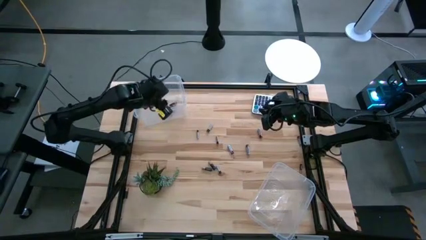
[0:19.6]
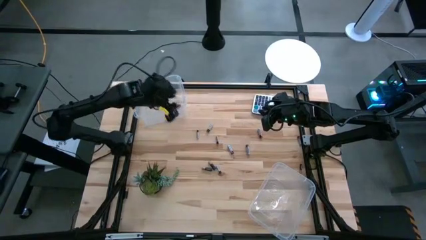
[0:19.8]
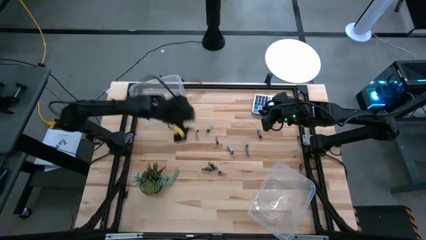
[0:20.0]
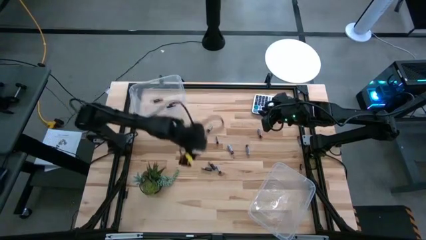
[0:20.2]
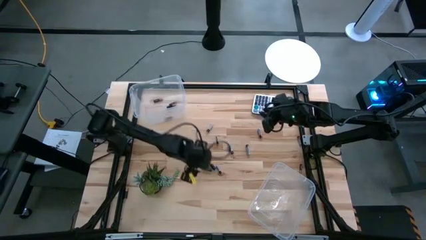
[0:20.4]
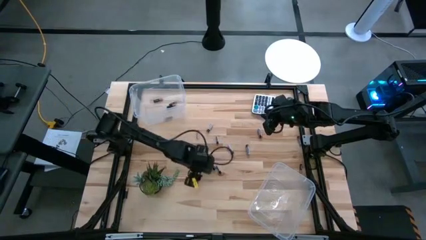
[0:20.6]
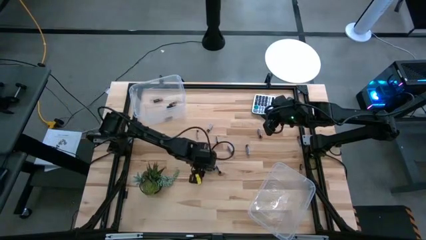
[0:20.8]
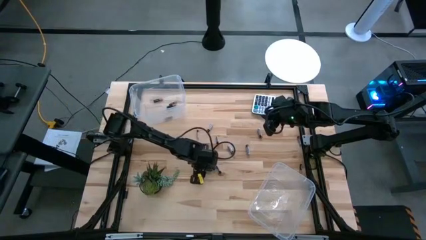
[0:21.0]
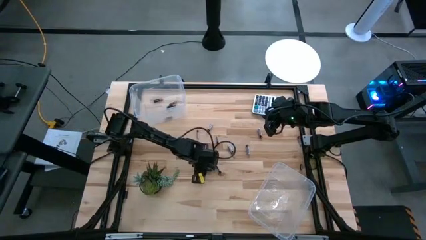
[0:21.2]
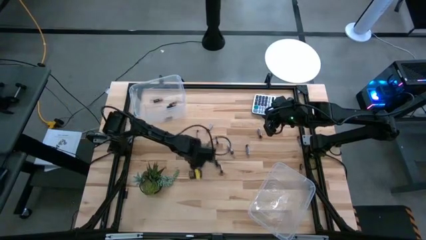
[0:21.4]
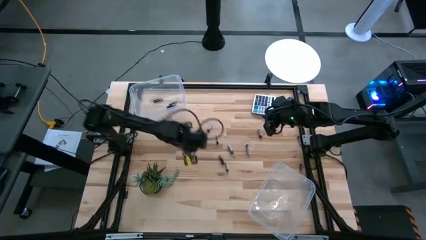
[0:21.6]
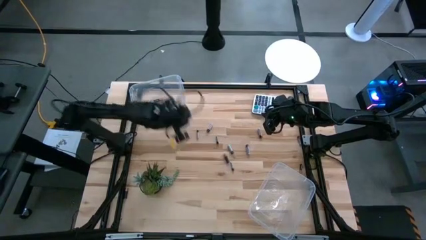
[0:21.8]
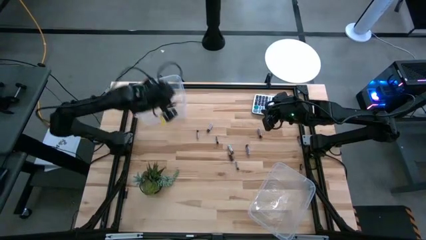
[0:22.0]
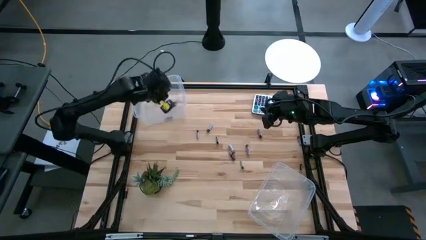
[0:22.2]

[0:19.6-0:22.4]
Task: Sort batteries
Put the black battery into the top transparent bin

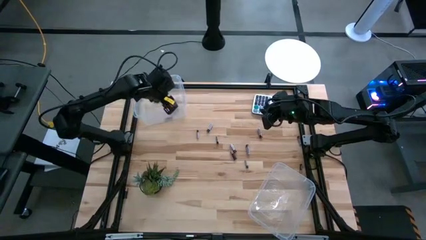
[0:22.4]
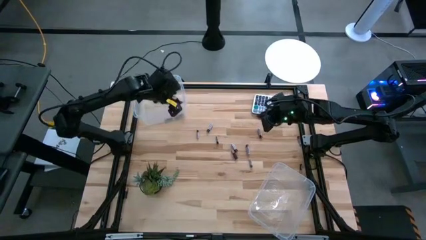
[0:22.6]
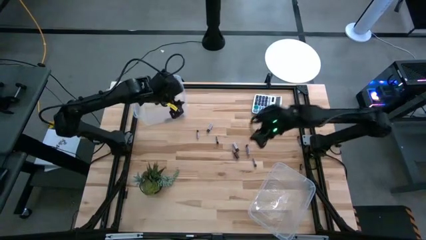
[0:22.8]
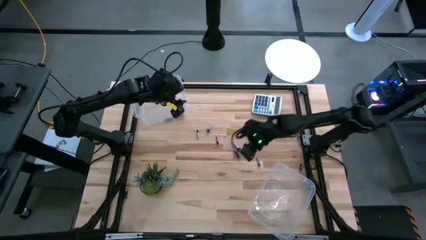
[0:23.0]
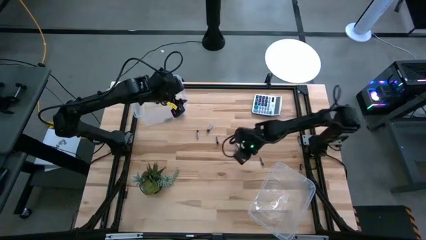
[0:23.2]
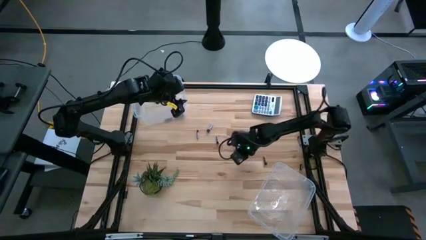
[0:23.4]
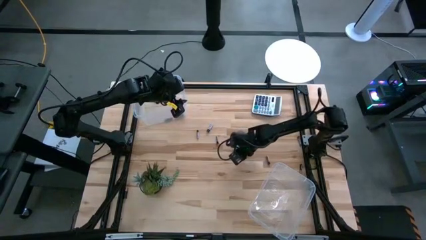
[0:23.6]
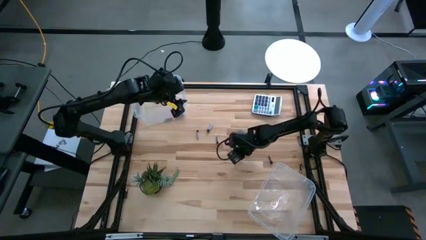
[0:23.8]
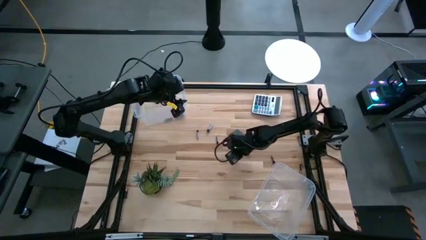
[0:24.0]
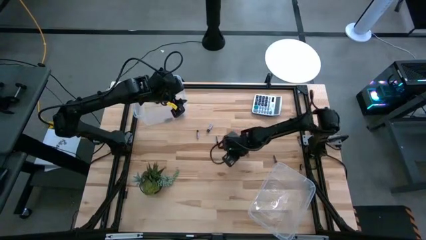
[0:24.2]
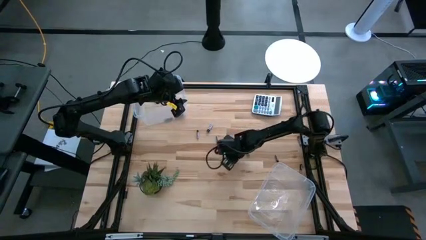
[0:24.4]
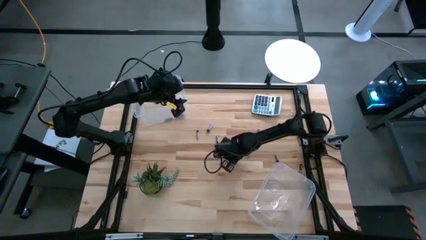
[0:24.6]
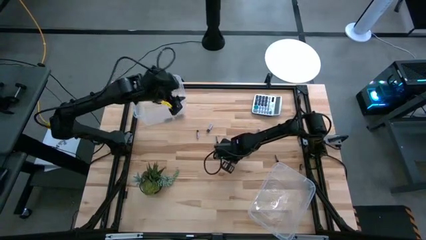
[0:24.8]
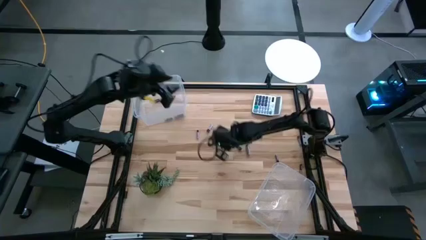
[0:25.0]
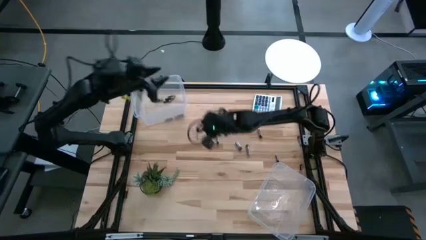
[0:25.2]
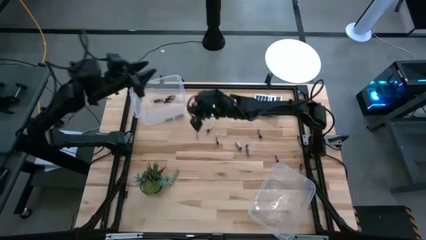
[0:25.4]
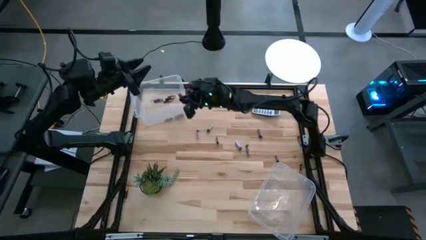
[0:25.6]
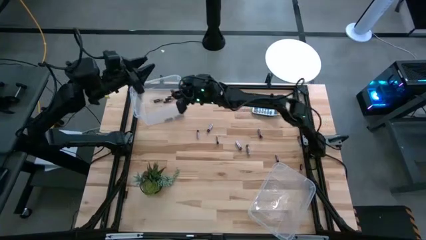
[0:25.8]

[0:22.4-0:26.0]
Put the black battery into the top transparent bin

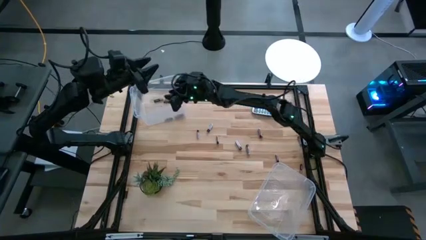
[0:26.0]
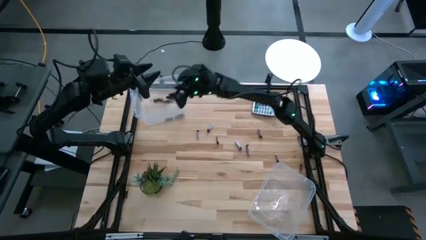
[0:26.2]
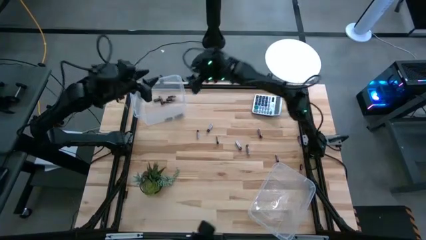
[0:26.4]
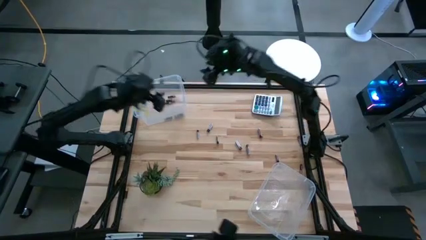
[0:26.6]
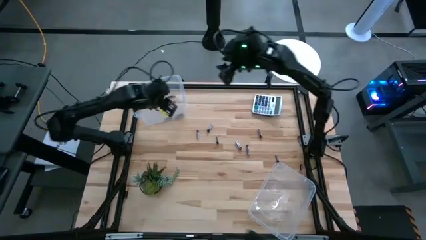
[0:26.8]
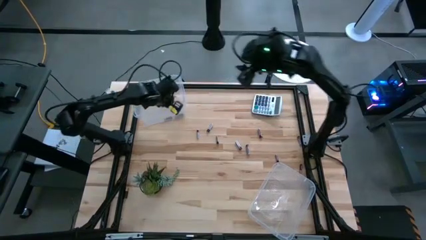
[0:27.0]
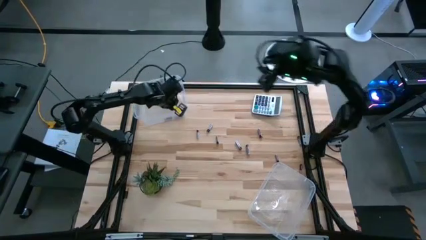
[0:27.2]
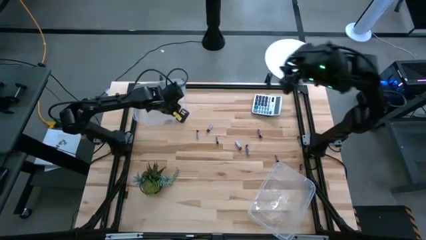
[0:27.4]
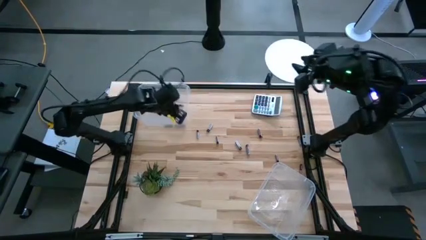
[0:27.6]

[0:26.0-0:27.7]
Adjust the top transparent bin

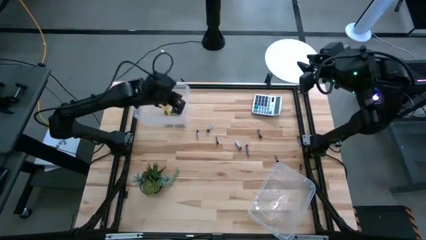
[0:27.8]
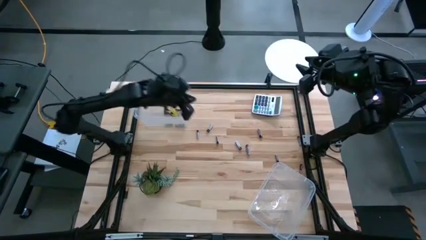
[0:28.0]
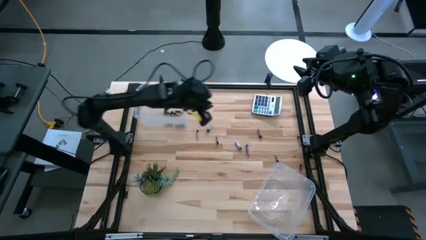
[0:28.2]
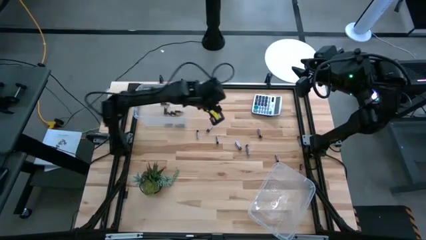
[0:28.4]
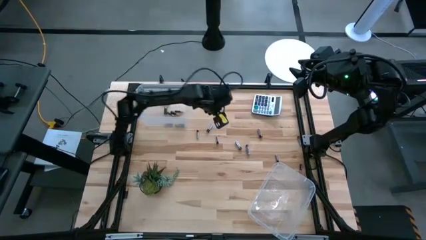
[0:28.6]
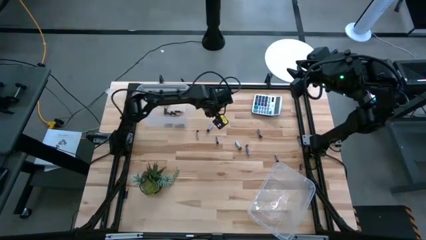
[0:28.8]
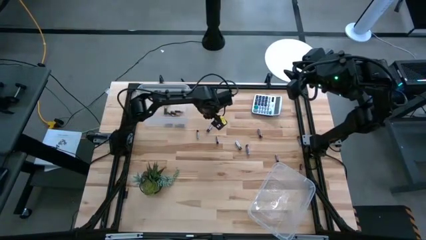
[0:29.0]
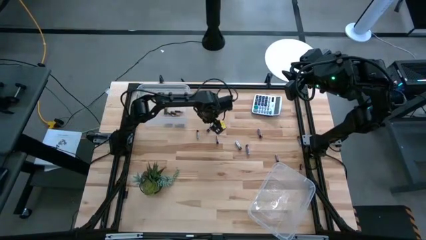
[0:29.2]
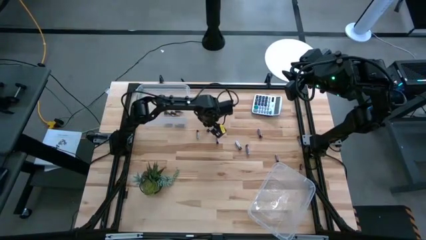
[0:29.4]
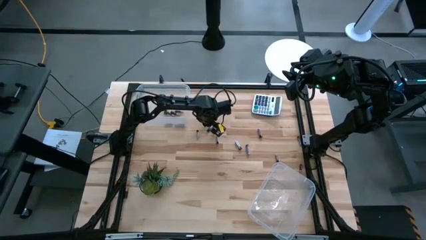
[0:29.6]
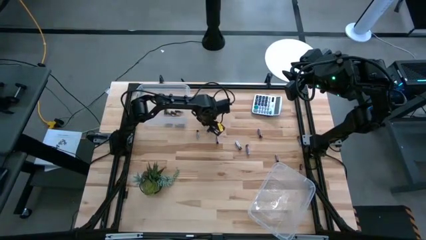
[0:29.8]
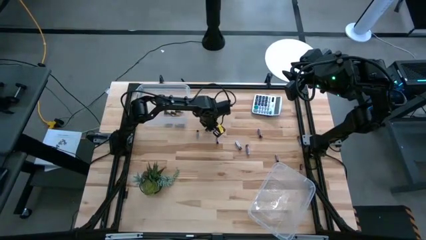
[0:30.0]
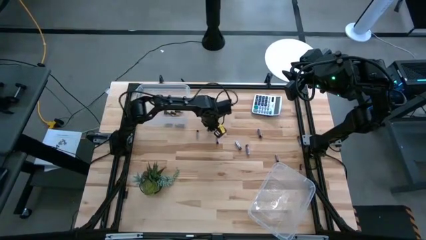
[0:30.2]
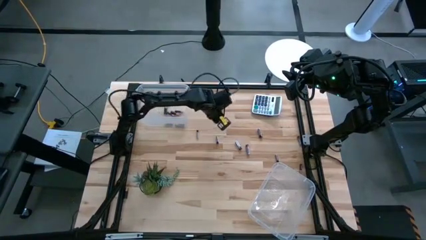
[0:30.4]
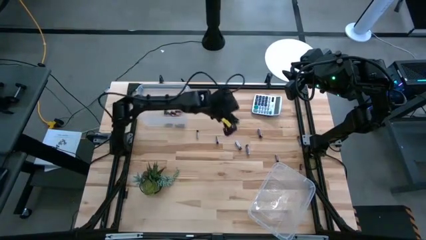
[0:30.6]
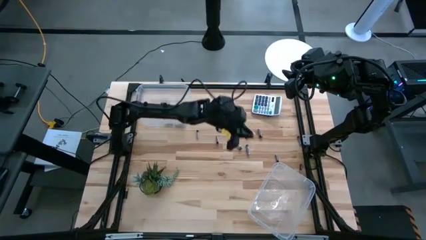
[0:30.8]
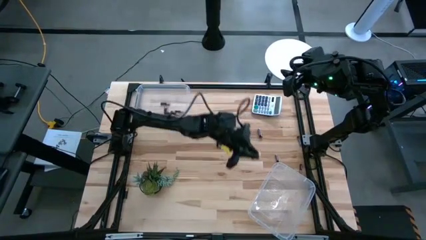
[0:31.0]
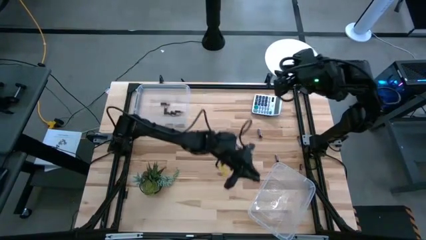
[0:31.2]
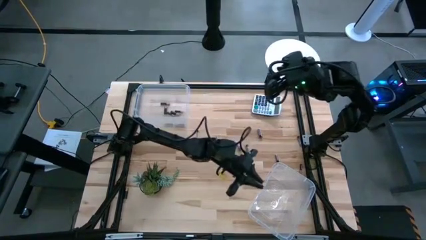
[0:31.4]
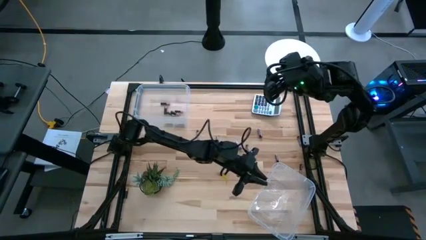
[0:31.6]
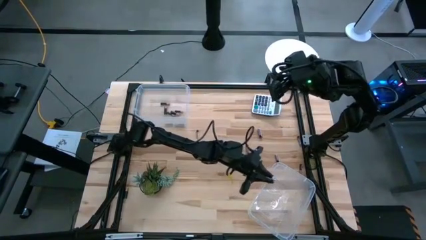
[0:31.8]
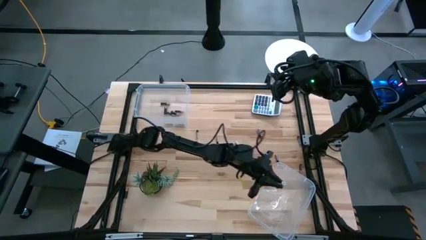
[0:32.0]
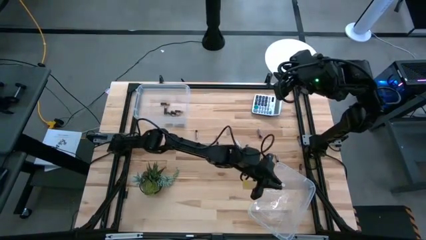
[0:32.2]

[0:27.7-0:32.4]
Put the silver battery into the bottom transparent bin

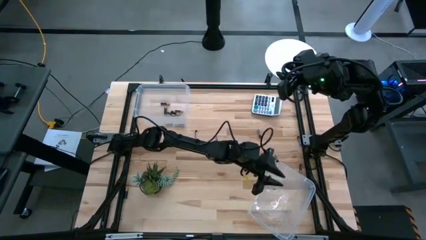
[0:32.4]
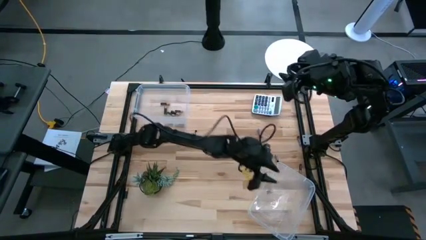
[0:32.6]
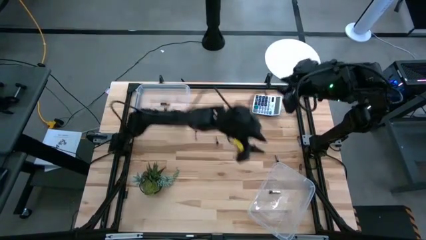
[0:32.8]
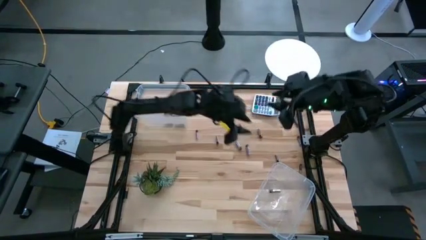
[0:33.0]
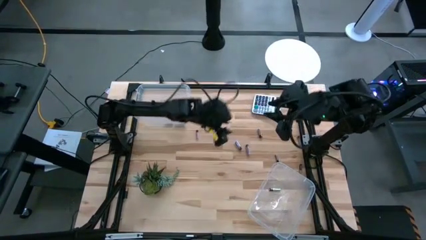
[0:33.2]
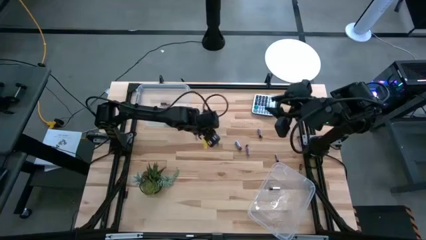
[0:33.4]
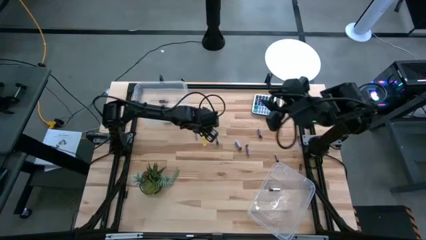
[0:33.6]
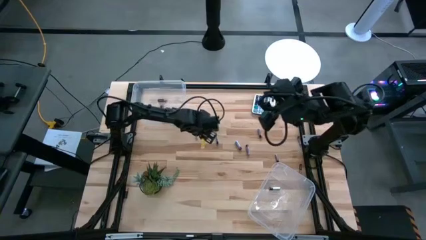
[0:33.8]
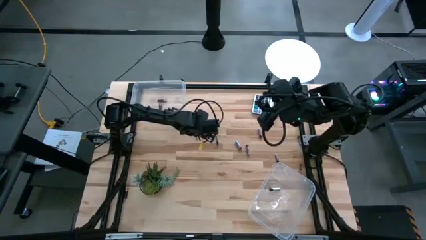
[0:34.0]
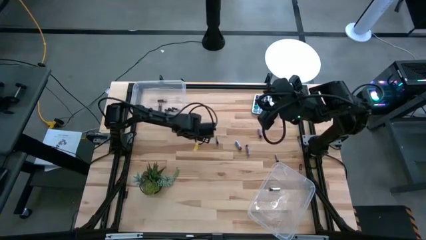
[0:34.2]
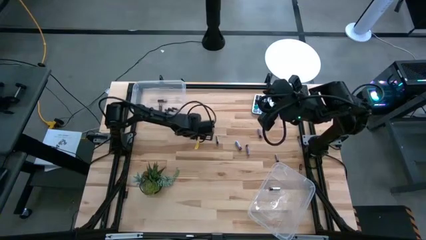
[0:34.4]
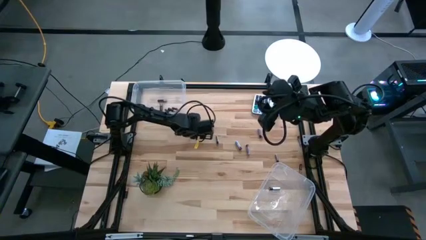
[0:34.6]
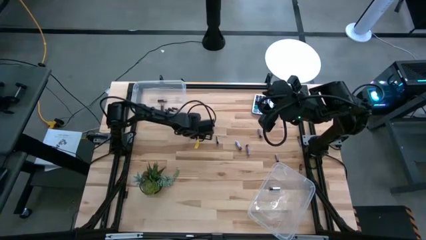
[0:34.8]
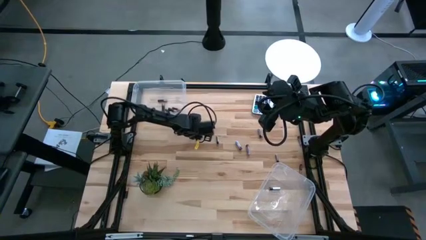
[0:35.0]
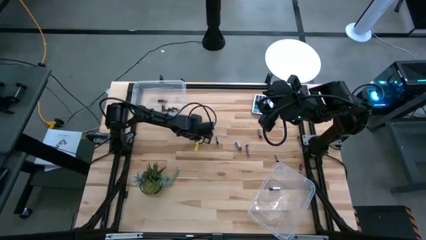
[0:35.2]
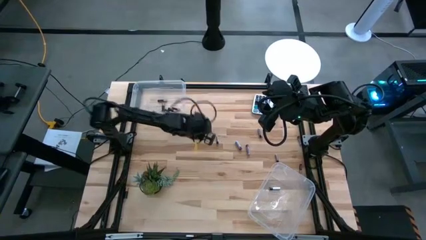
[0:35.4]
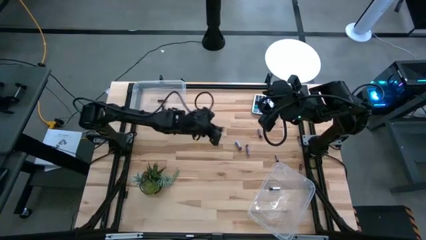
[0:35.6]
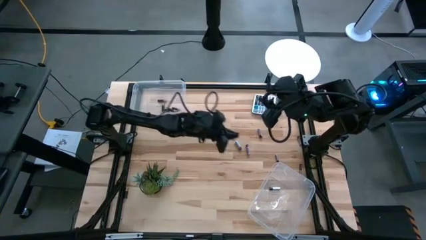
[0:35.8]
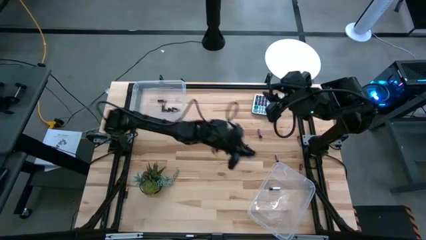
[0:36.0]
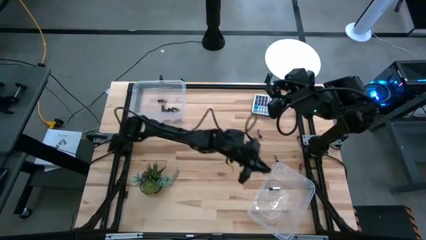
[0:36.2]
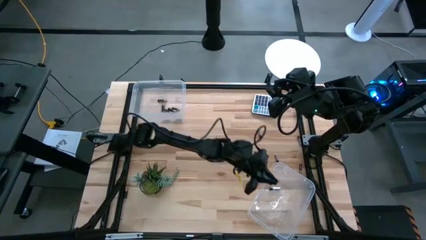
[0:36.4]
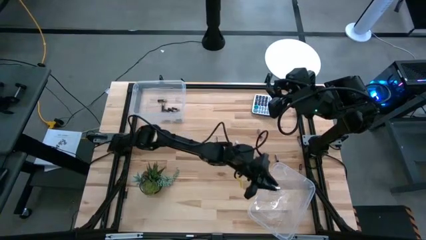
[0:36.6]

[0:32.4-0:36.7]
Put the silver battery into the bottom transparent bin

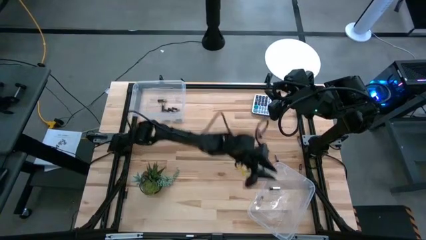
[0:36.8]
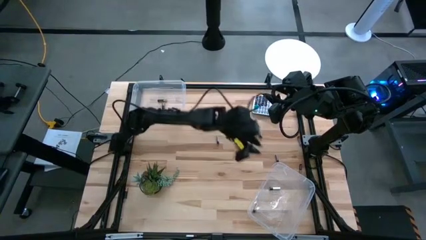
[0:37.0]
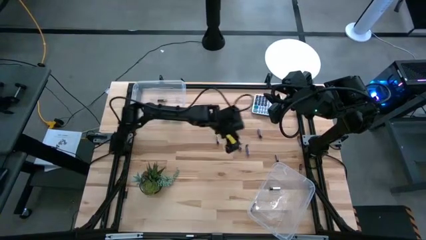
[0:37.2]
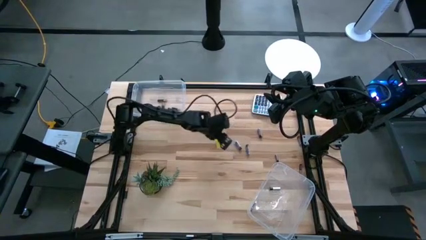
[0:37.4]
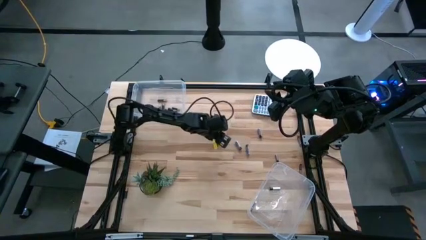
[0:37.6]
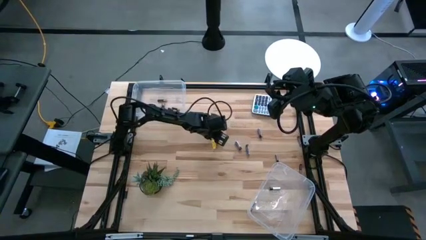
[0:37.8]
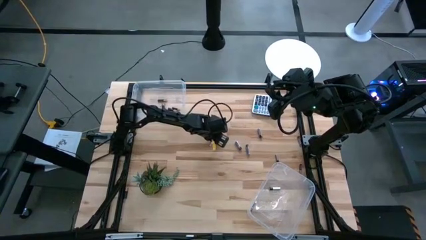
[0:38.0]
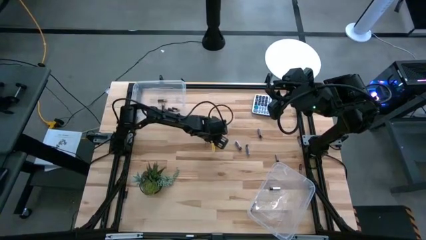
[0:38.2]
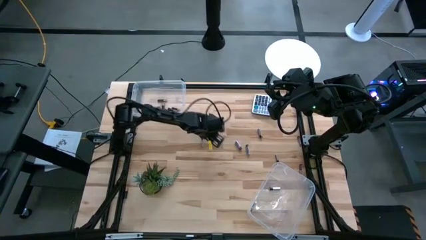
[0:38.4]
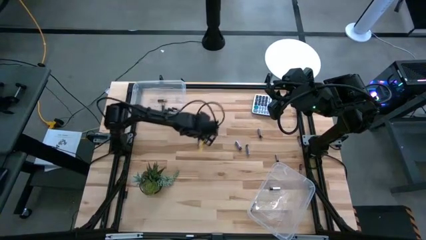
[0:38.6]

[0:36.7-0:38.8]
Put the silver battery into the bottom transparent bin
